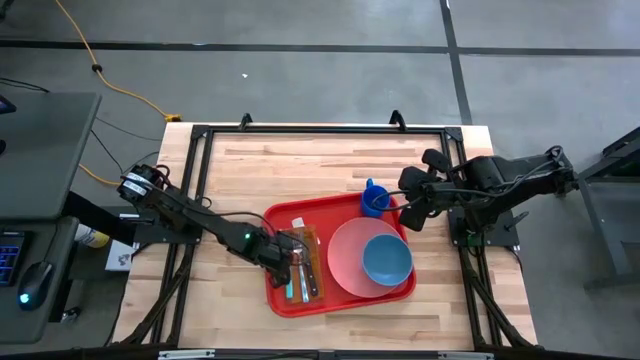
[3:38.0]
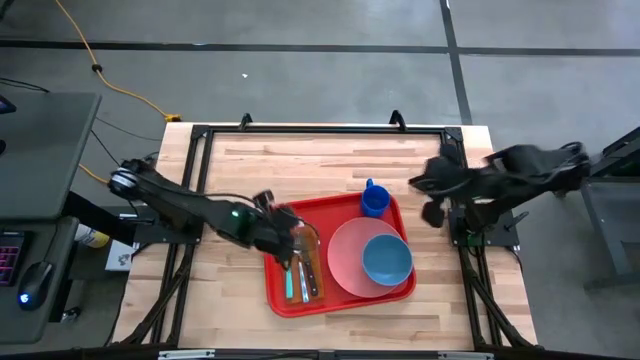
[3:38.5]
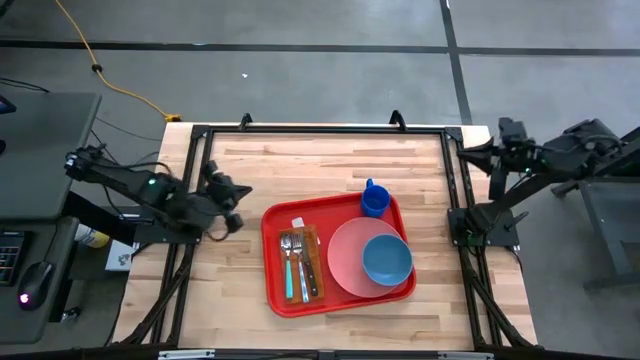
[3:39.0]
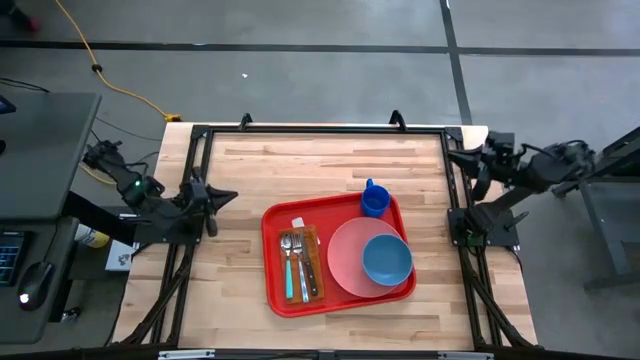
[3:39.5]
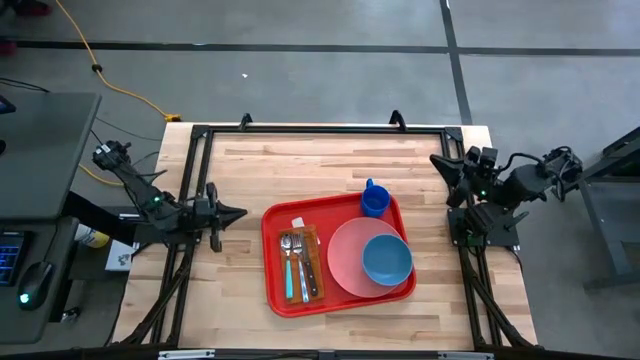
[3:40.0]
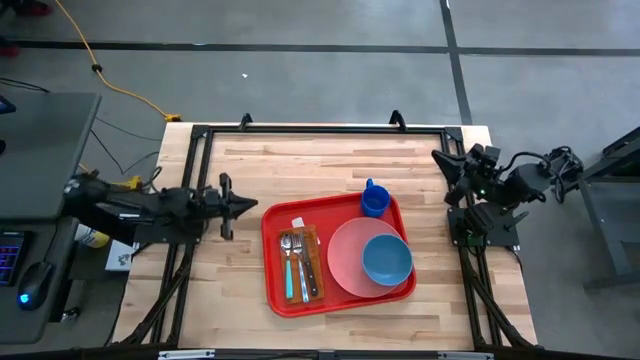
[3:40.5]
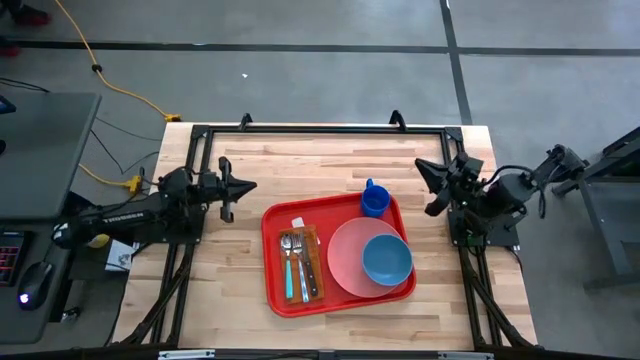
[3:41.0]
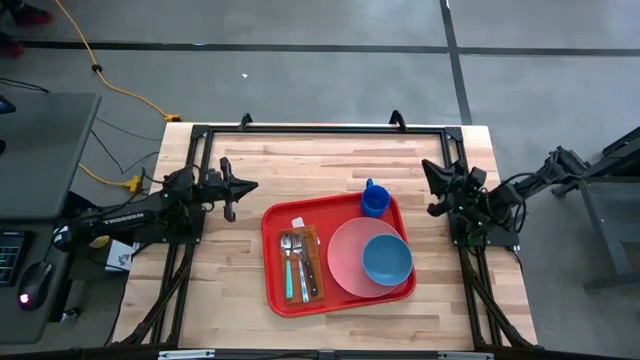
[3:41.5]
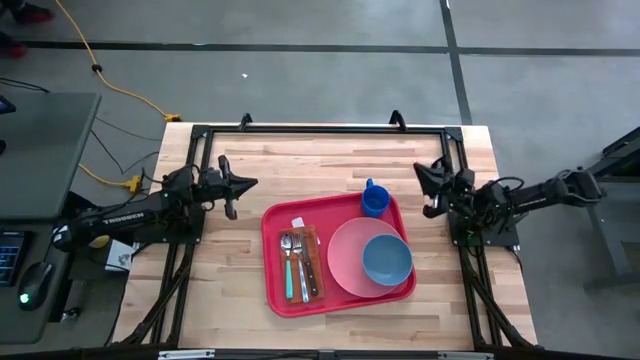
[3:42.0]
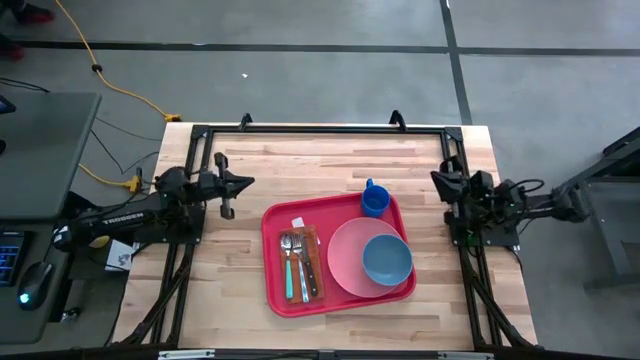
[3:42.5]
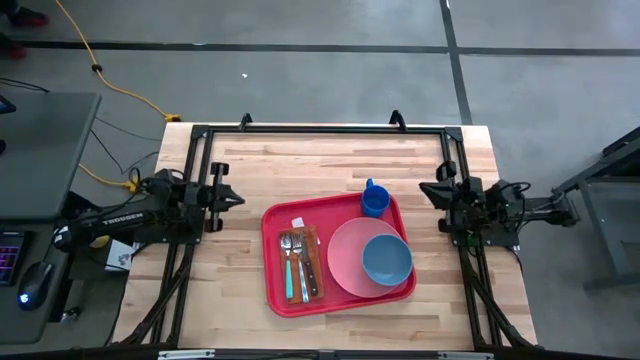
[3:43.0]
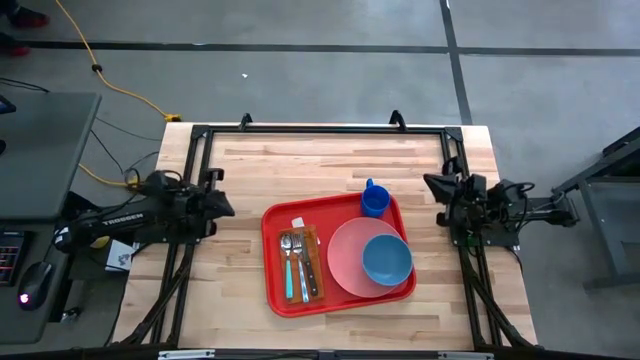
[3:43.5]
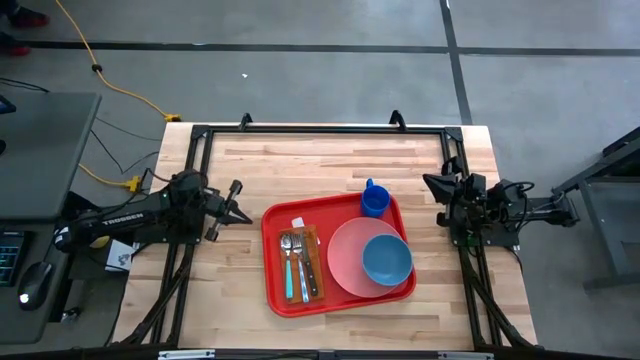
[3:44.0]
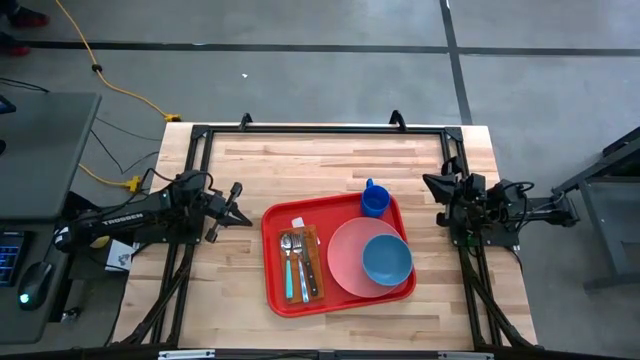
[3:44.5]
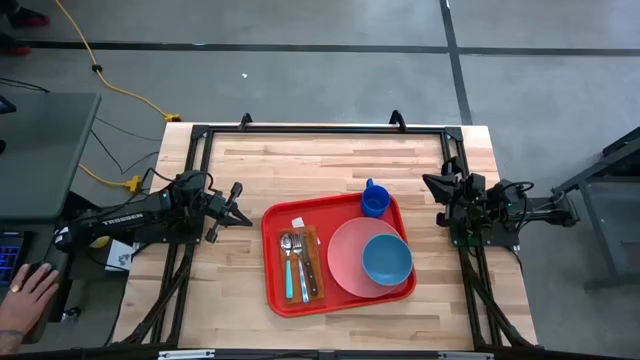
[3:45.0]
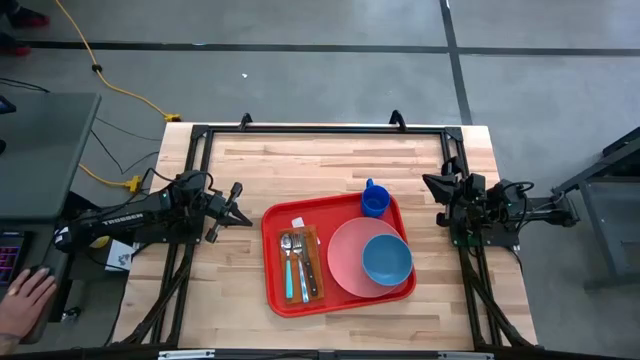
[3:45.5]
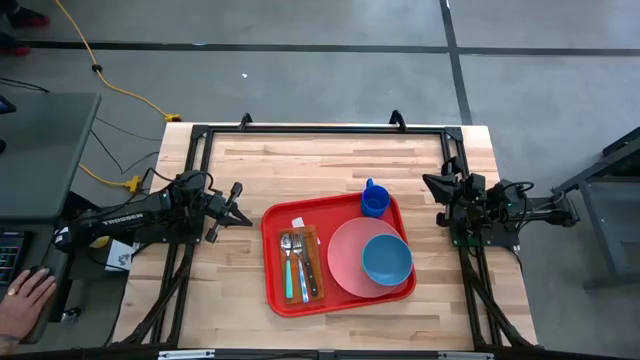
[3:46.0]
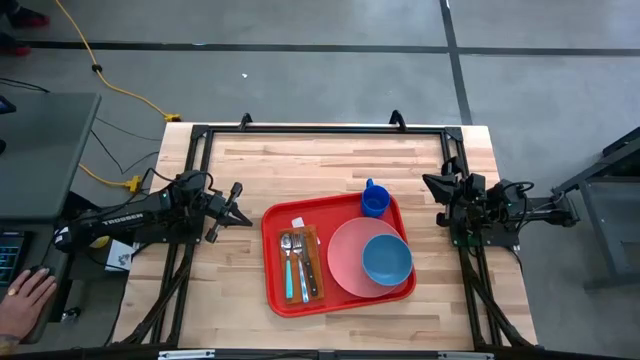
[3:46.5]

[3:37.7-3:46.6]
Task: Set up tray
Return to Home Position

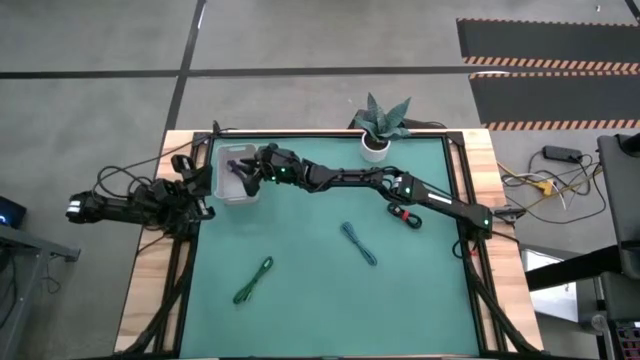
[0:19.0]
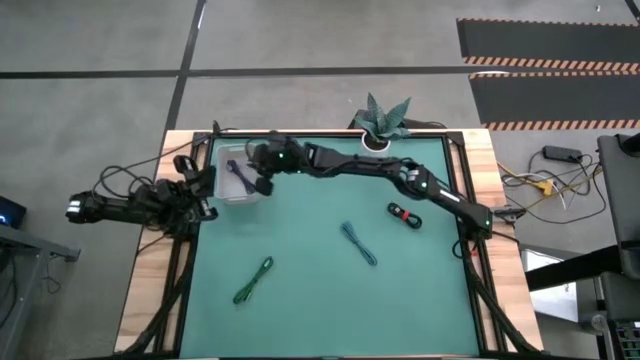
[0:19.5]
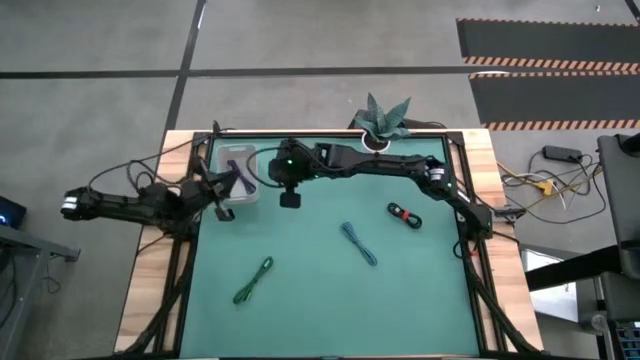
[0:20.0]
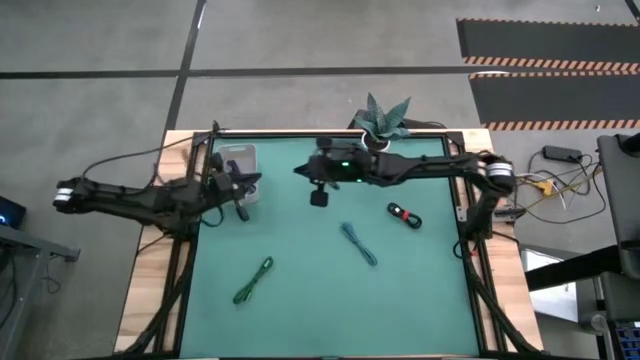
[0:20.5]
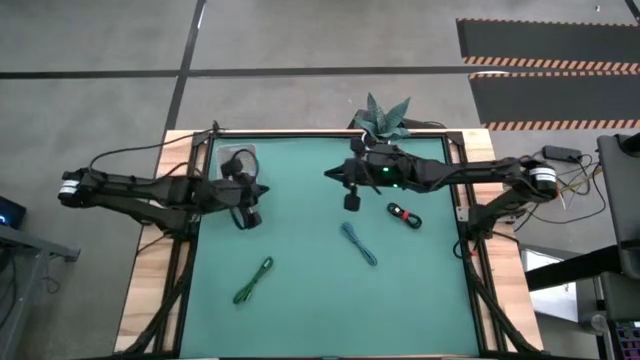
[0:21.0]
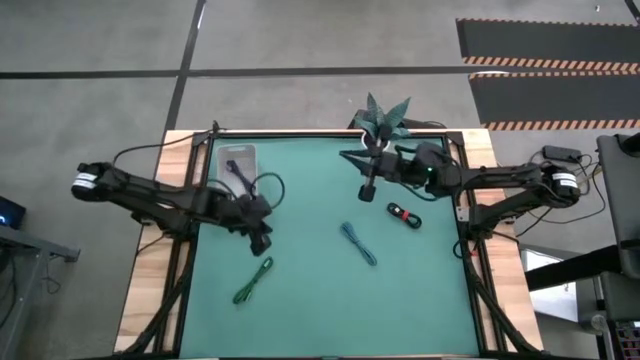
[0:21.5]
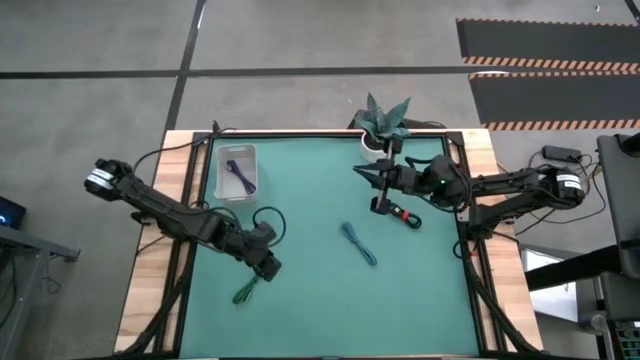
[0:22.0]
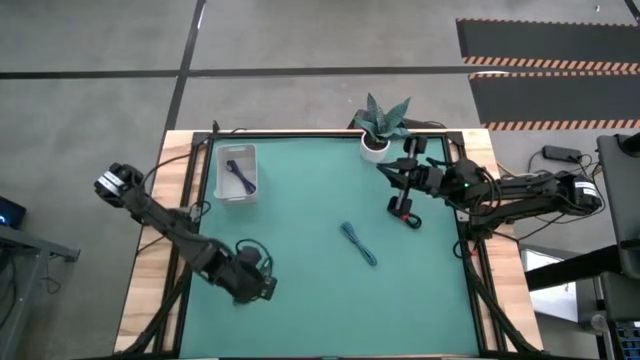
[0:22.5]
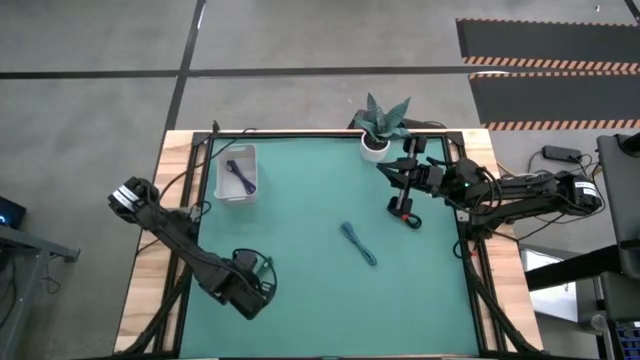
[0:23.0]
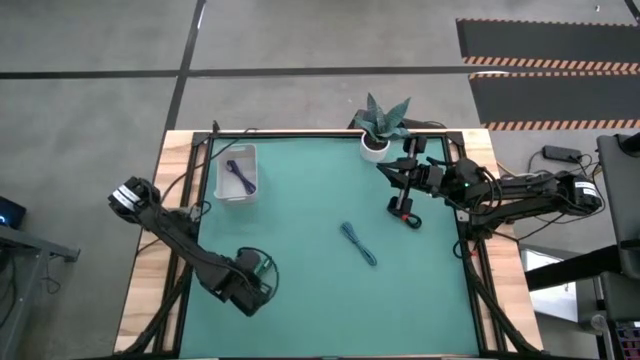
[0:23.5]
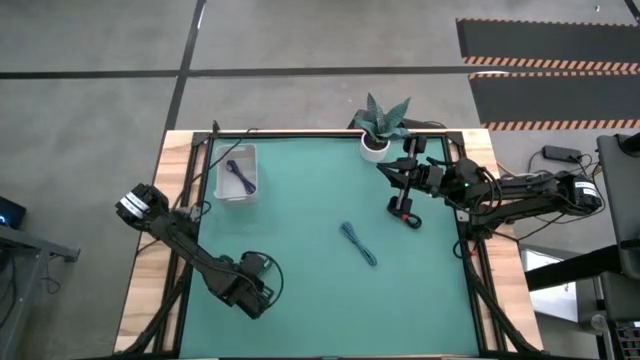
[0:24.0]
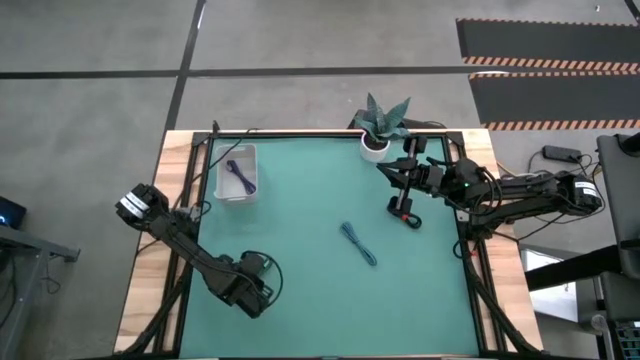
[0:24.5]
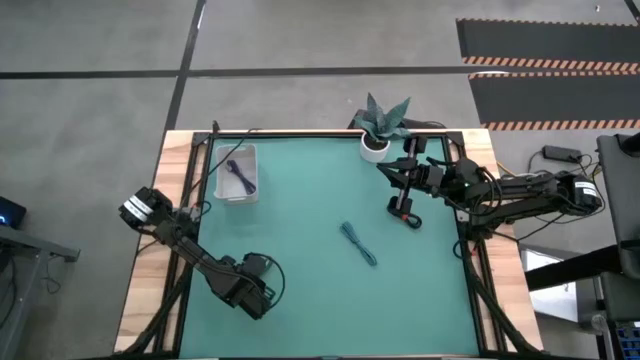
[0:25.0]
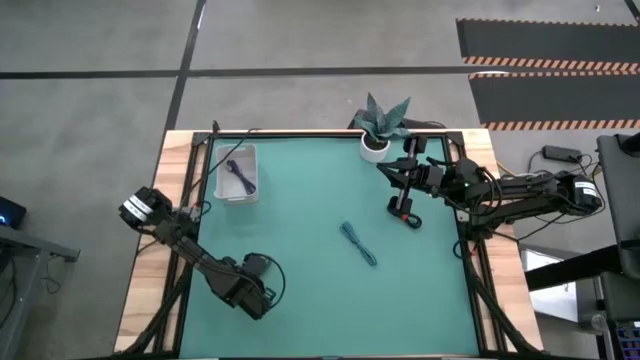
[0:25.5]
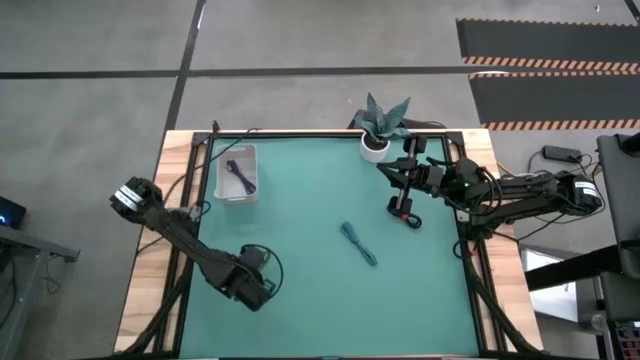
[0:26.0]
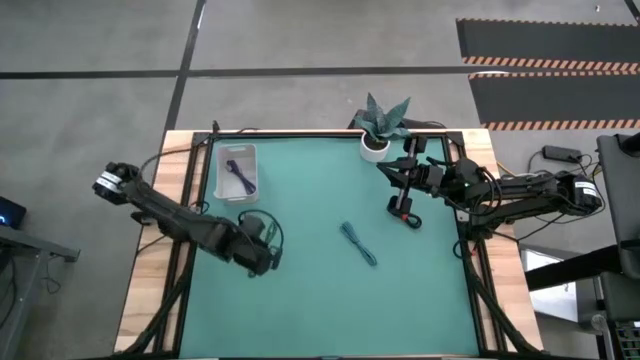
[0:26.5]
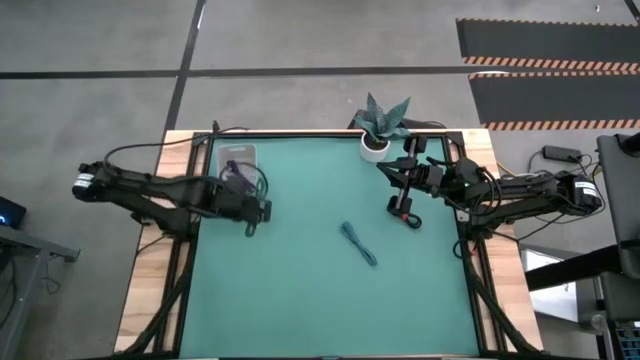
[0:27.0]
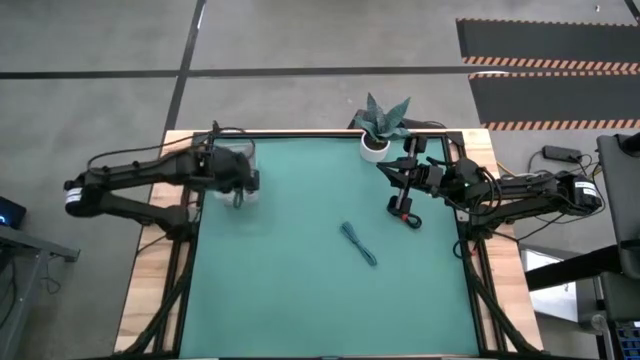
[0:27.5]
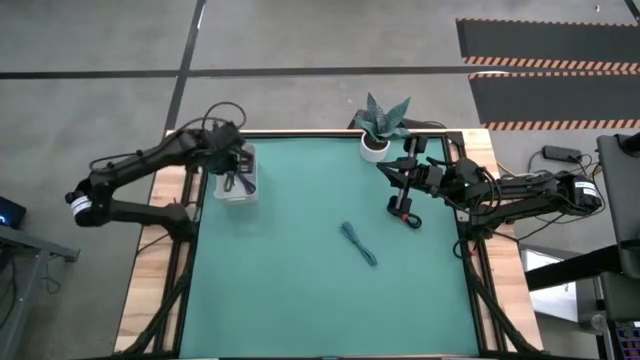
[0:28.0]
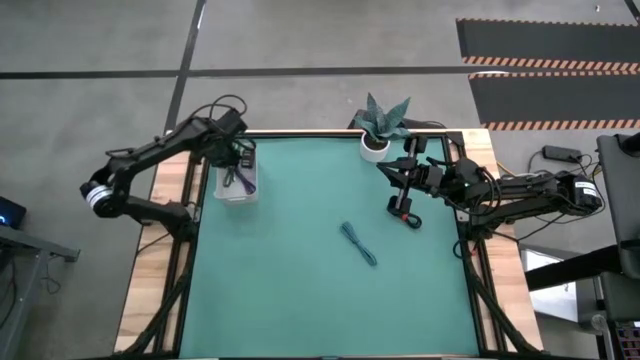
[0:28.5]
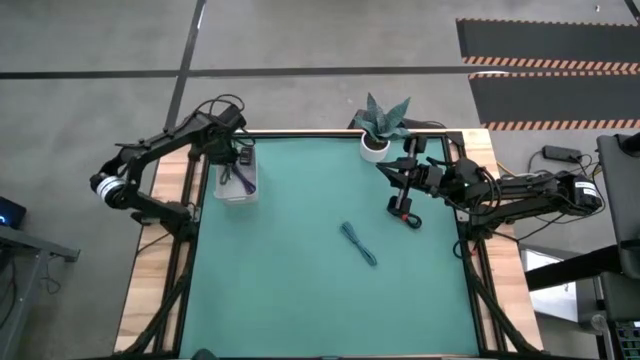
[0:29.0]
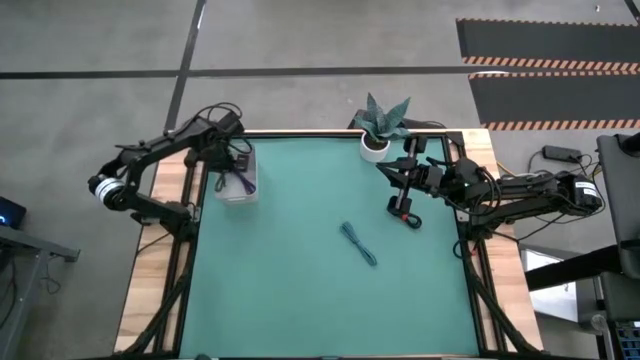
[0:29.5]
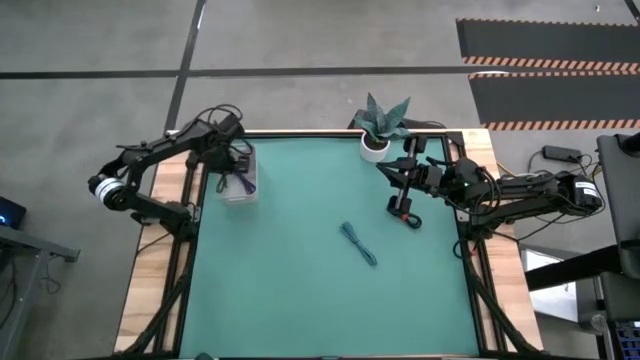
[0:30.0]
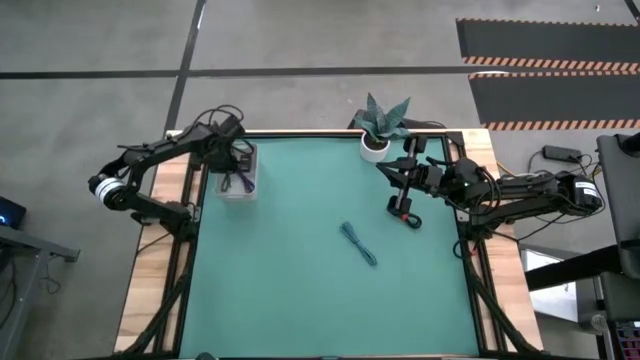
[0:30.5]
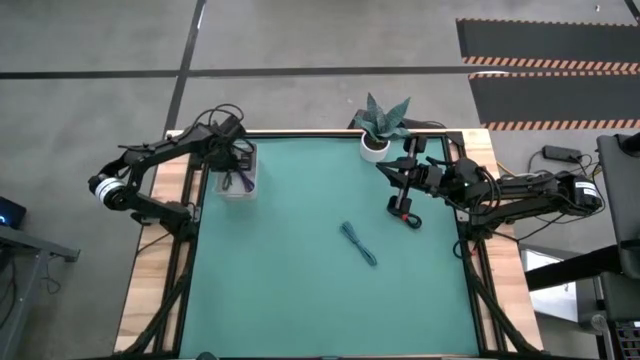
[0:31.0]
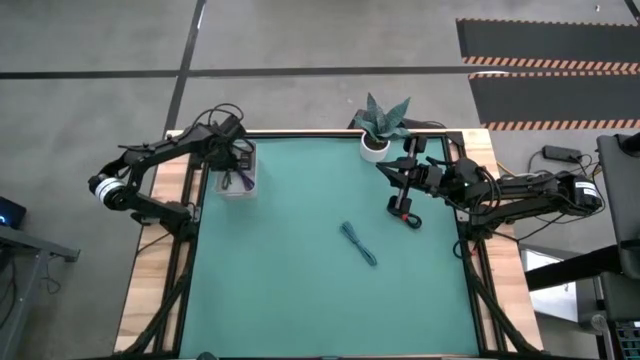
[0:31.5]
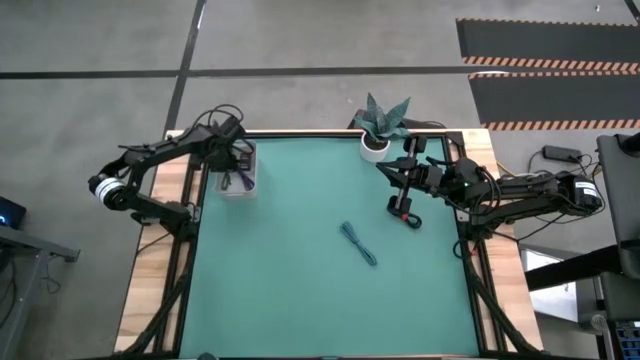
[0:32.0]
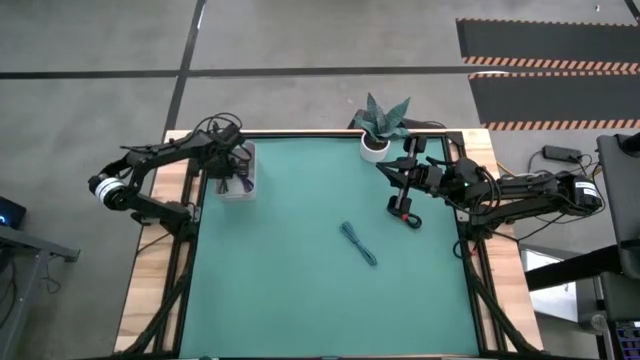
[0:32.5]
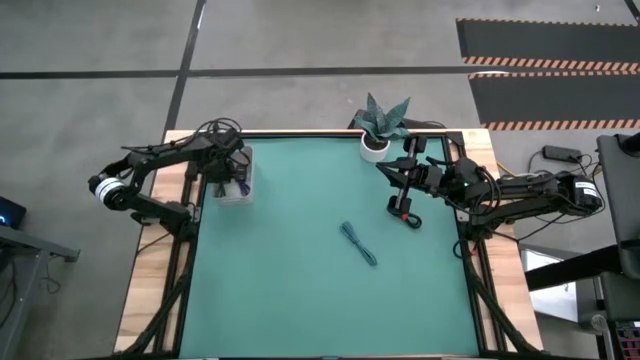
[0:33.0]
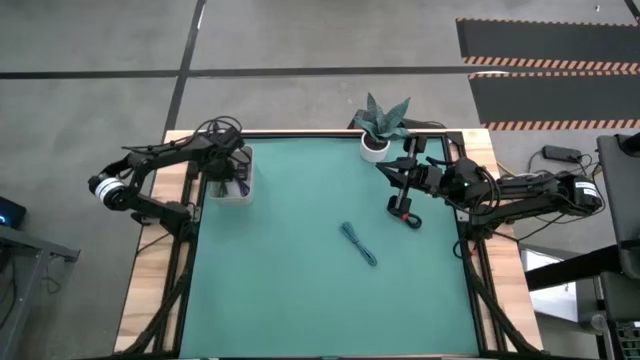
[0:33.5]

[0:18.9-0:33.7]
Task: Pick and place USB-C Cables
Put the green usb cable into the gray bin
